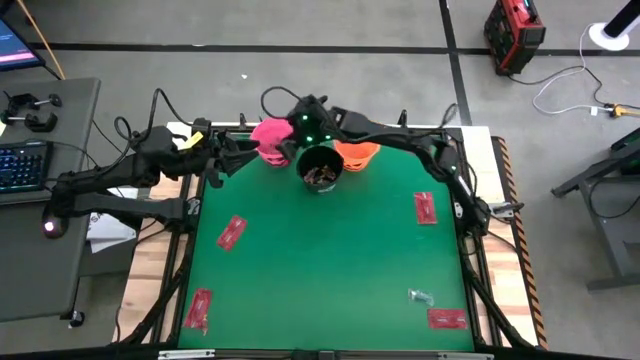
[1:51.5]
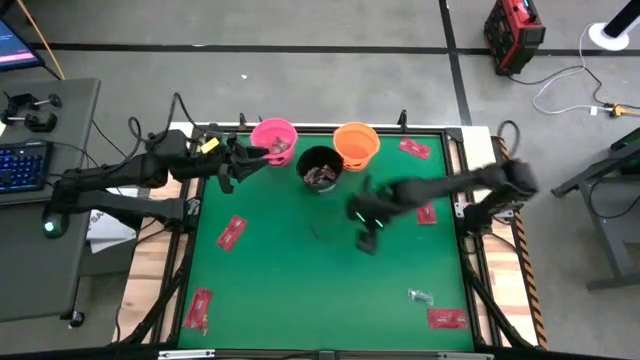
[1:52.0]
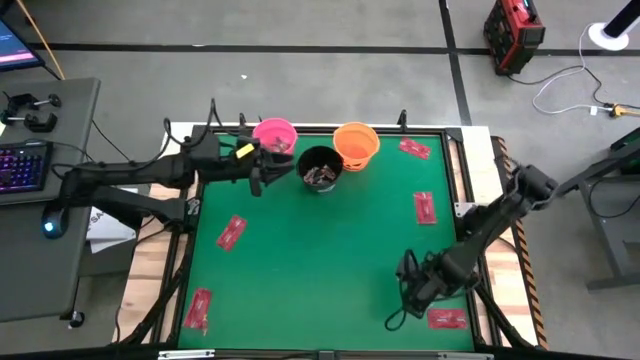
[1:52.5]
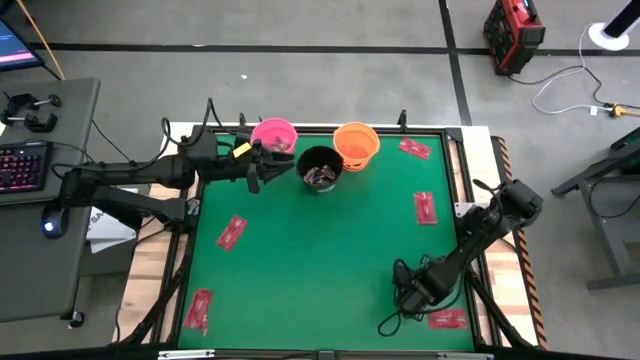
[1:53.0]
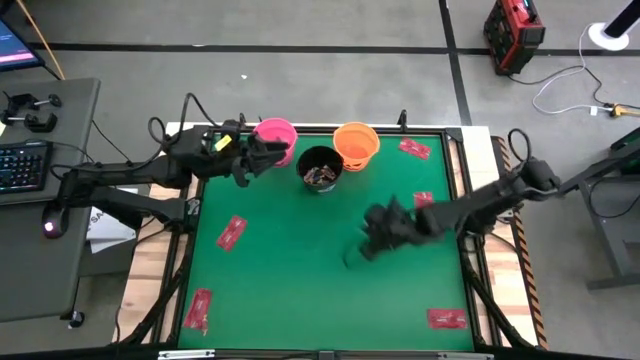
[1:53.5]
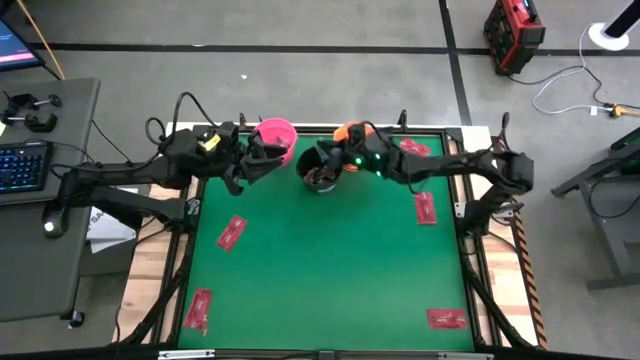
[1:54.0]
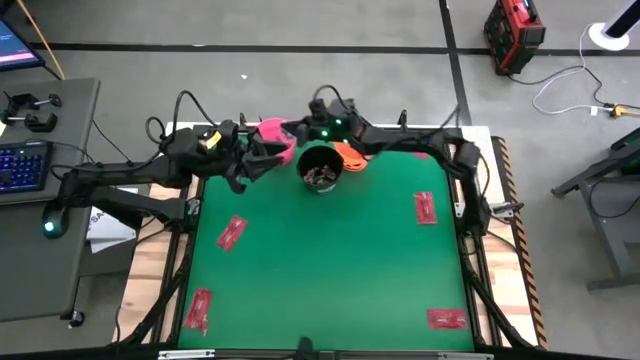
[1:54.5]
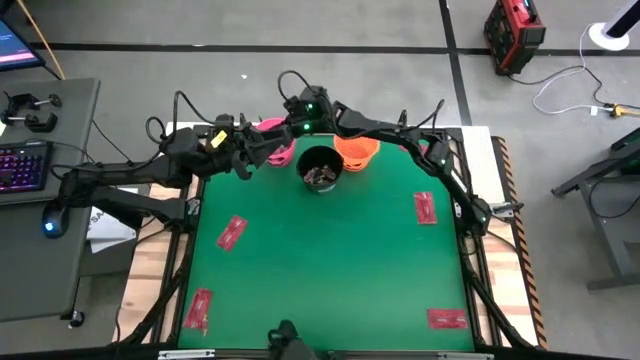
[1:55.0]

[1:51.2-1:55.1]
Task: Sort candy by brand, put in halloween buckets
Put the blue gummy into the pink bucket

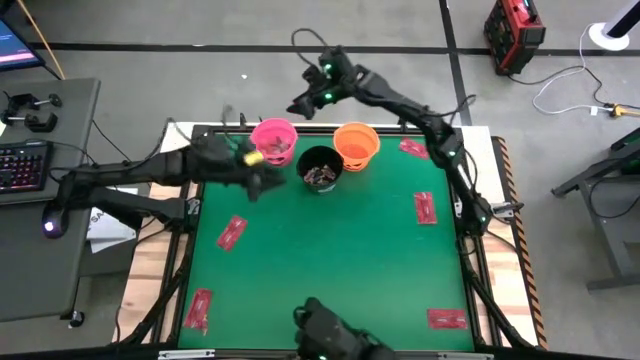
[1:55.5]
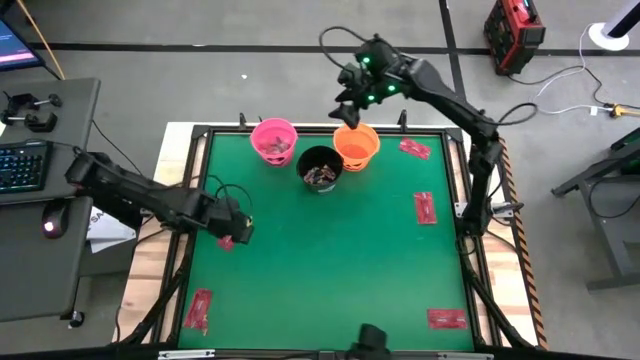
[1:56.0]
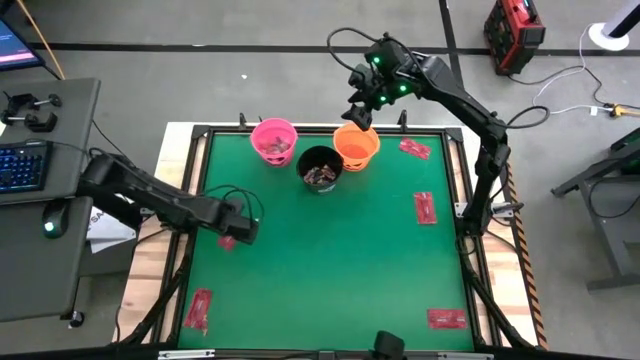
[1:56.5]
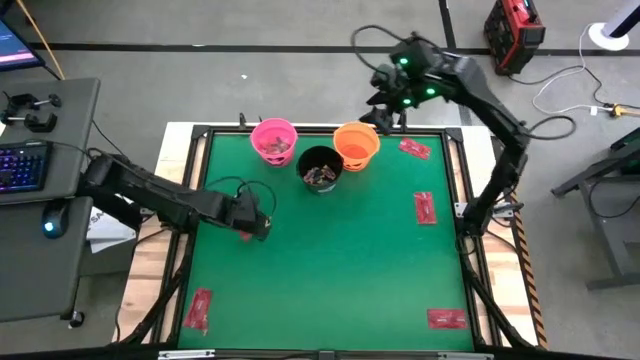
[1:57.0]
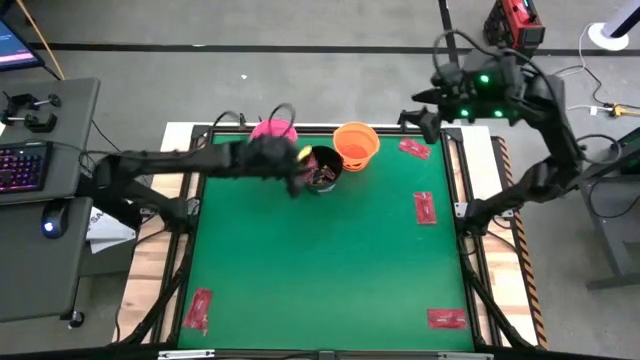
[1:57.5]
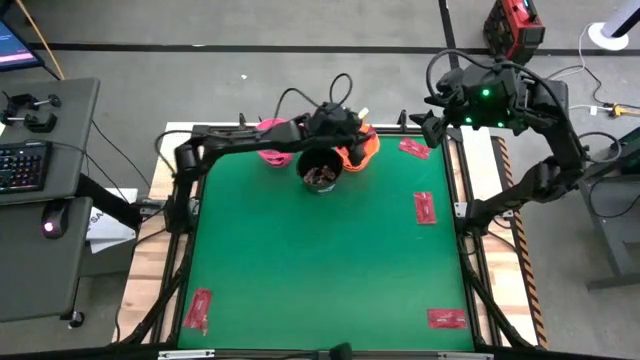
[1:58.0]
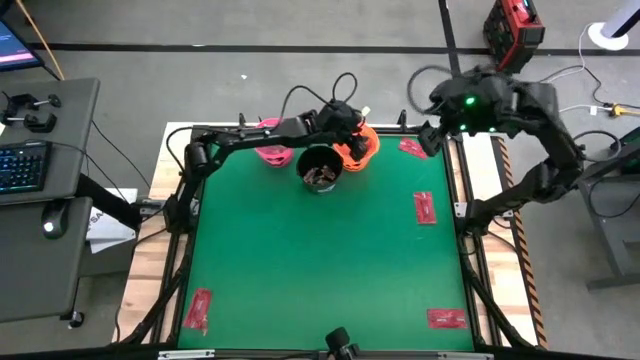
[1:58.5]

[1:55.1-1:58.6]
Put the red candy packet into the orange bucket

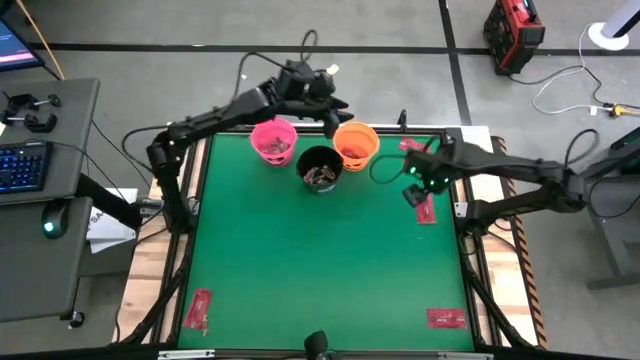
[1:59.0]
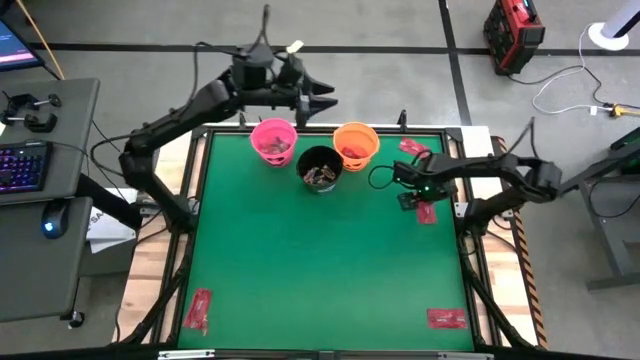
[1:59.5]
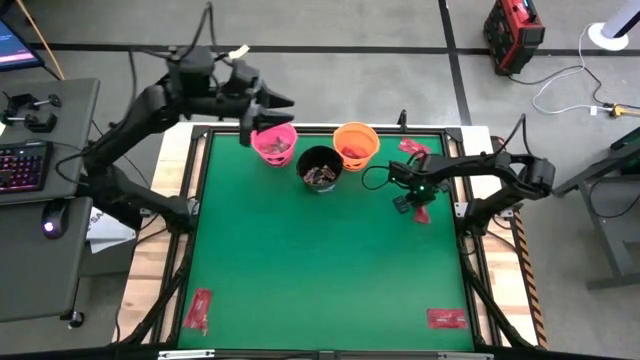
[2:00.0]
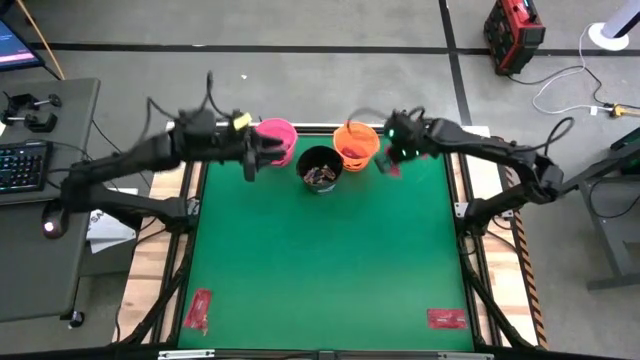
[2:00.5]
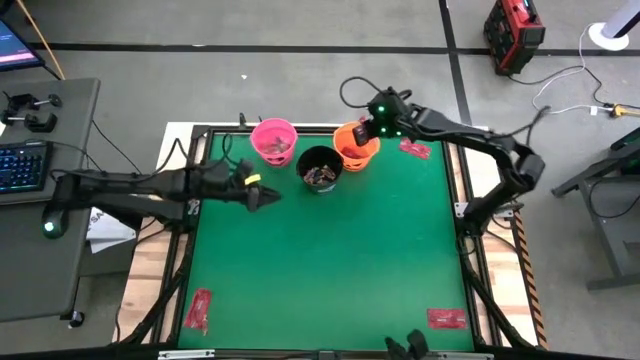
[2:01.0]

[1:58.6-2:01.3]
Put the red candy packet into the orange bucket

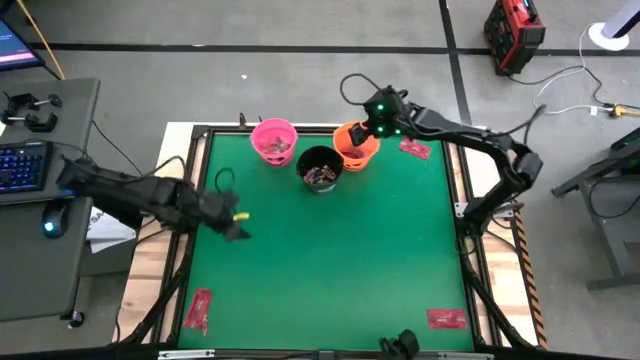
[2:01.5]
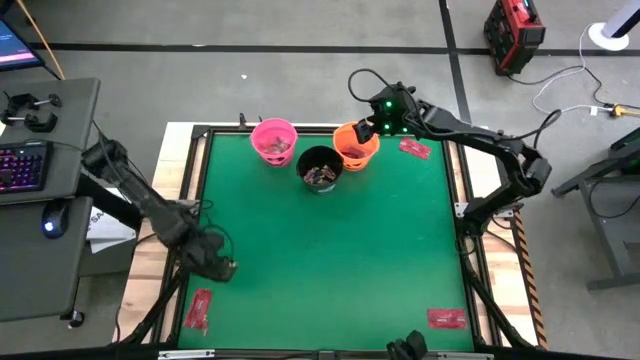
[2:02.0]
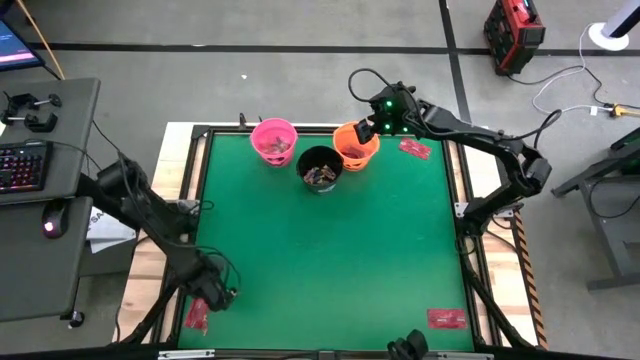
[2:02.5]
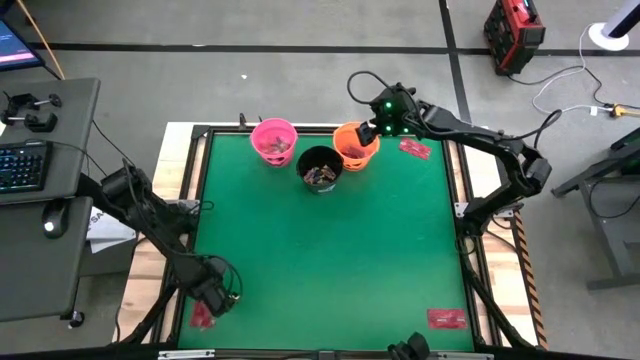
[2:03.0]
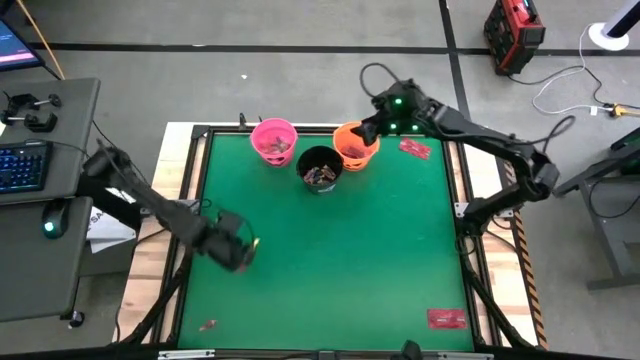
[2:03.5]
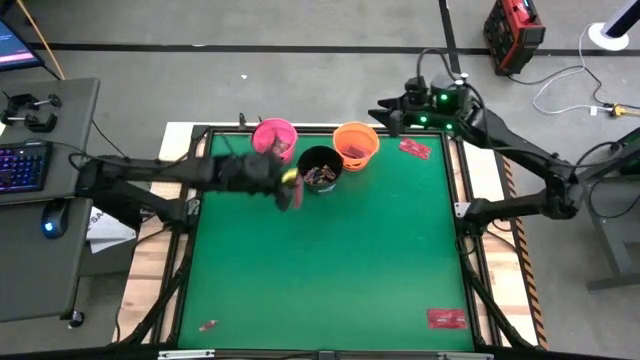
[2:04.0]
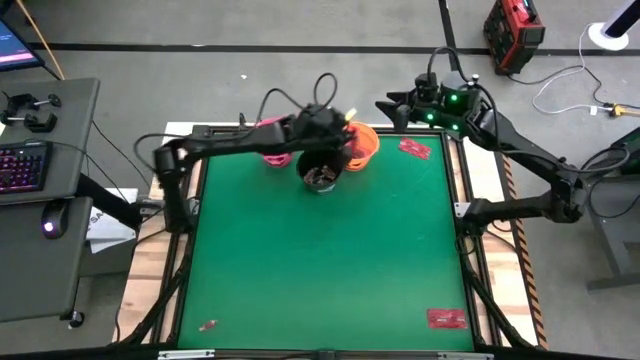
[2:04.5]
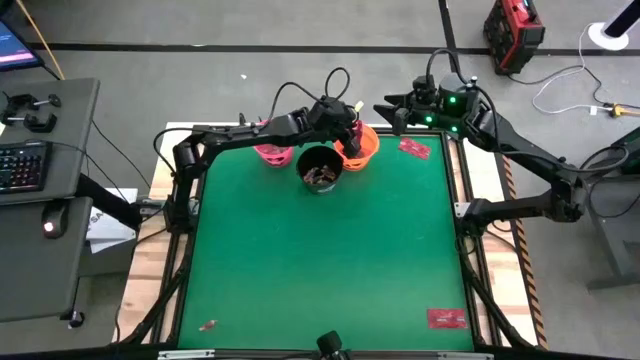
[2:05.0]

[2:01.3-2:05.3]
Put the red candy packet into the orange bucket

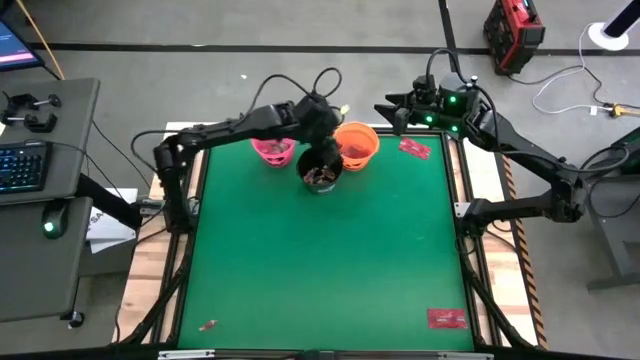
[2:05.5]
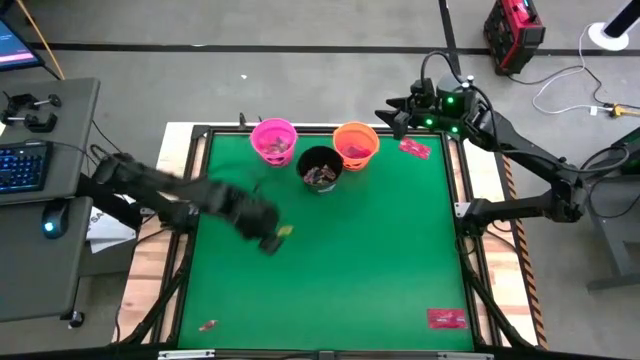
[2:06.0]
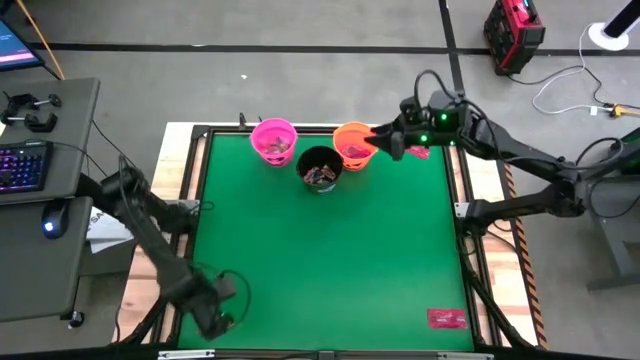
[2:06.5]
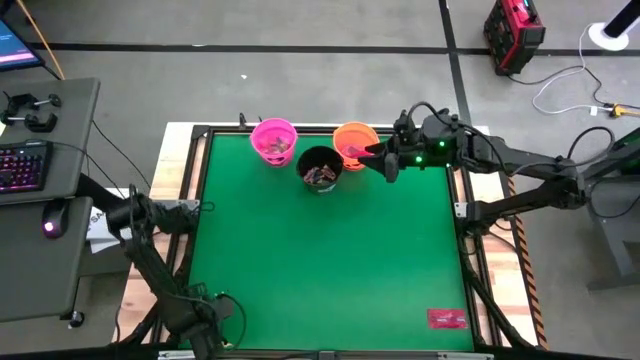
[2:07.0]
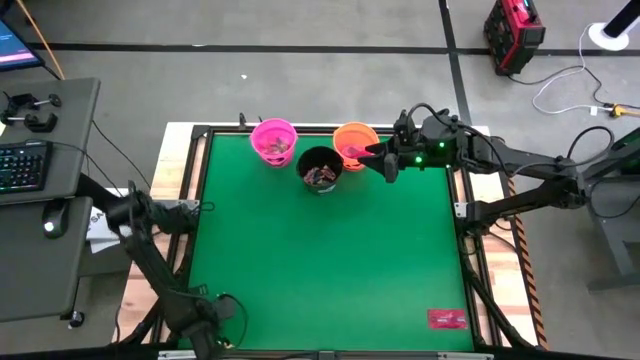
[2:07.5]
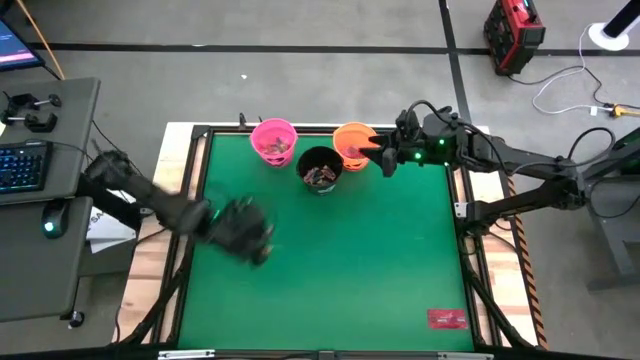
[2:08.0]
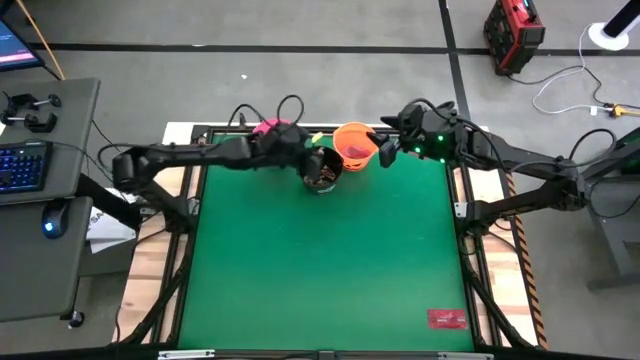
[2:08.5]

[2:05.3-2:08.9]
Put the orange candy into the black bucket

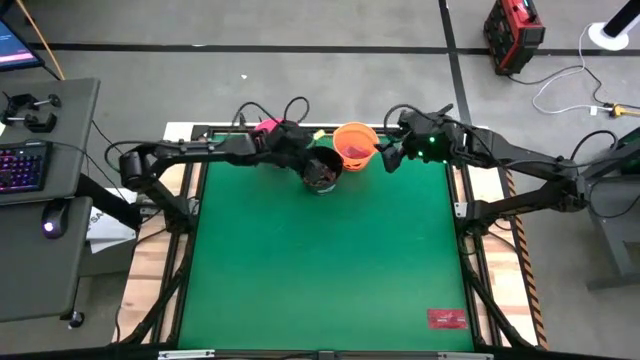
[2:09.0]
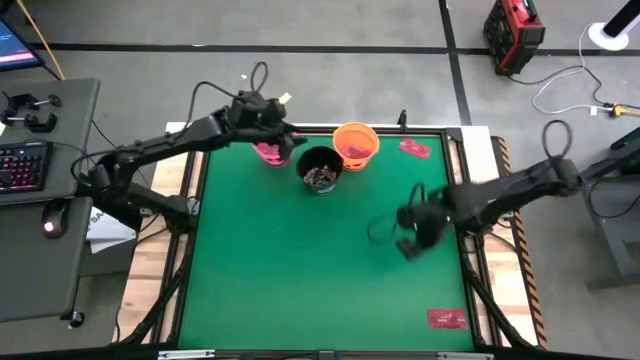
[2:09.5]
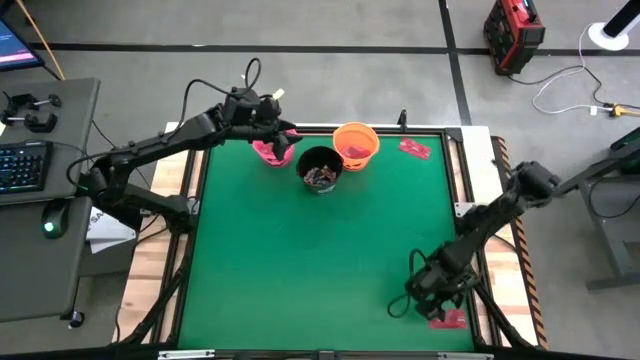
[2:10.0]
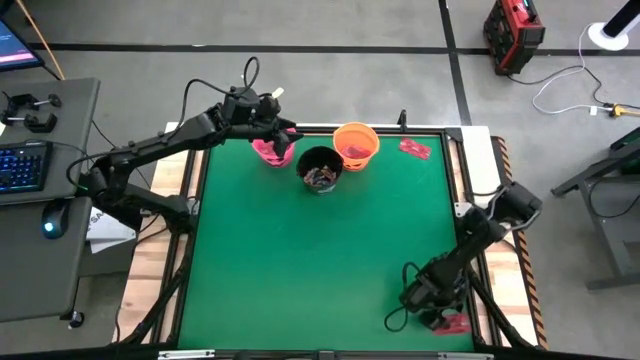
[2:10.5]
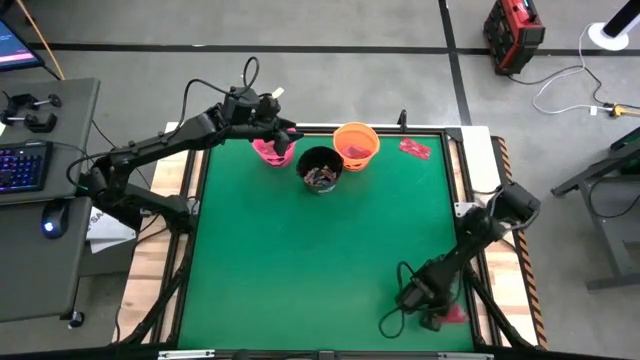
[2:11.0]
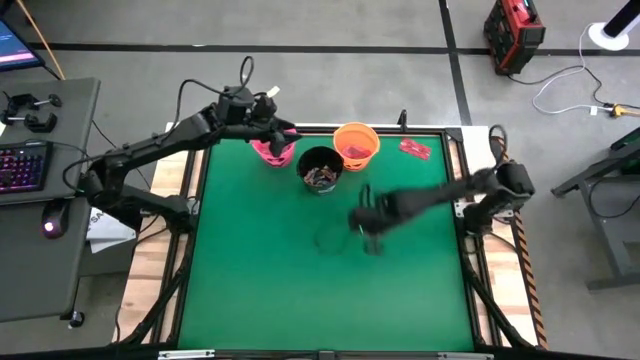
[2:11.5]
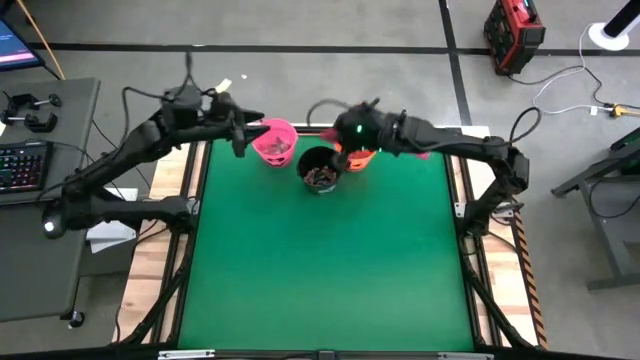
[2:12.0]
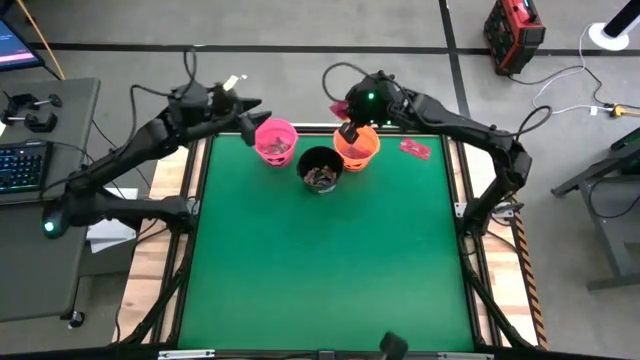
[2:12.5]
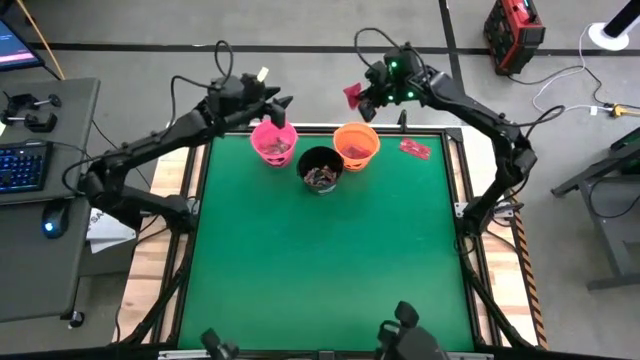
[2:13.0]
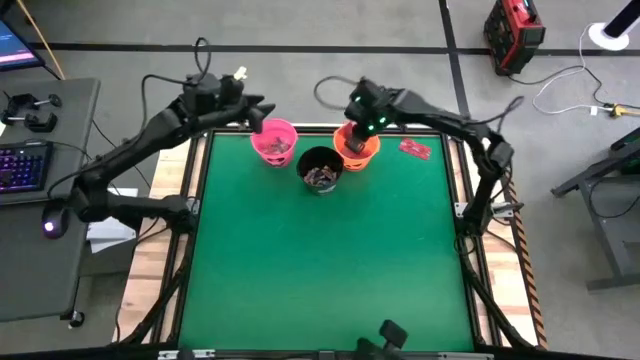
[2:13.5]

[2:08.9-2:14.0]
Put the red candy packet into the orange bucket
